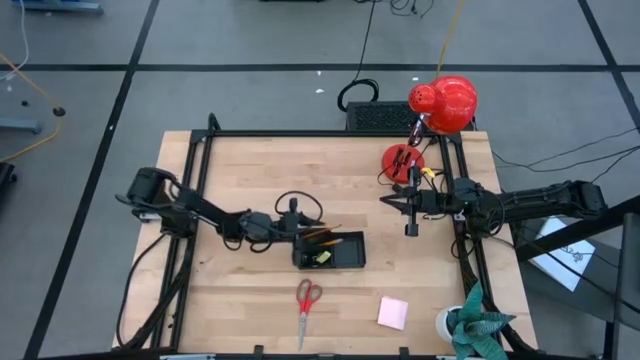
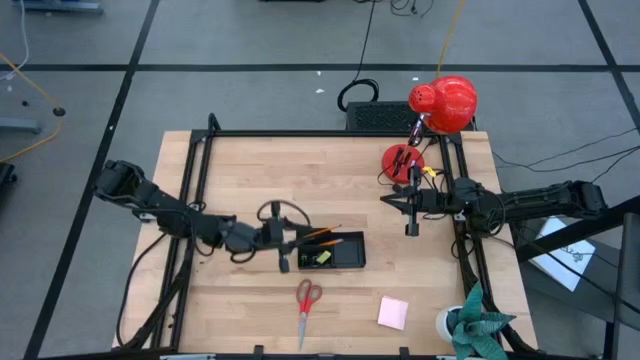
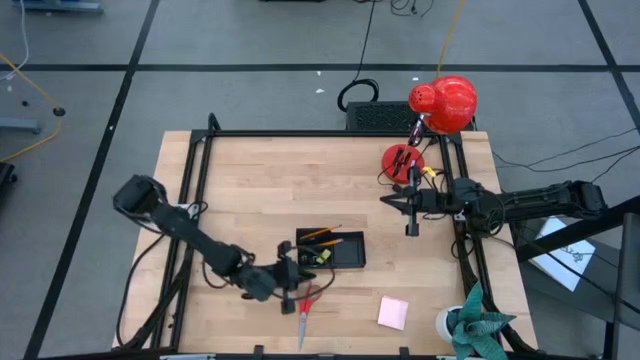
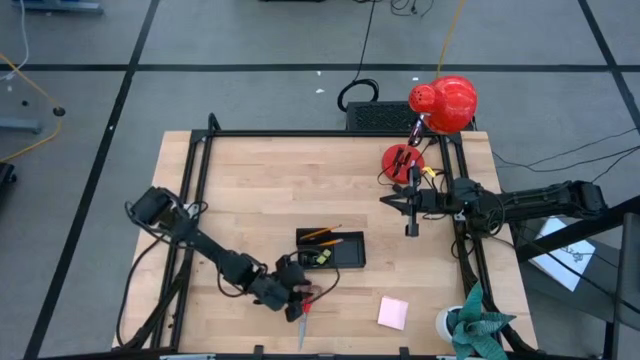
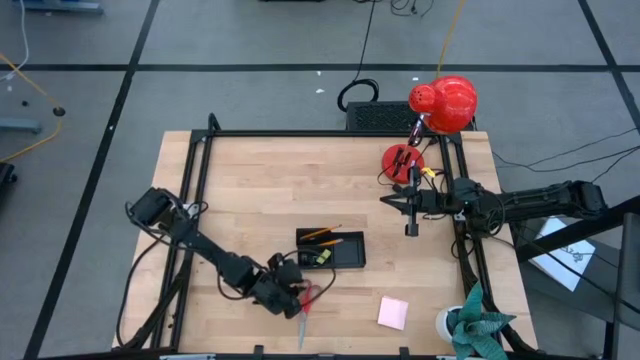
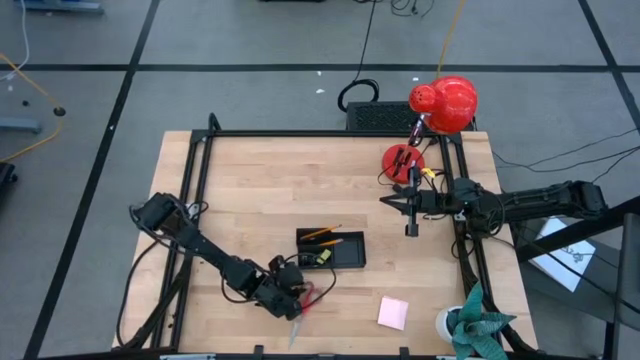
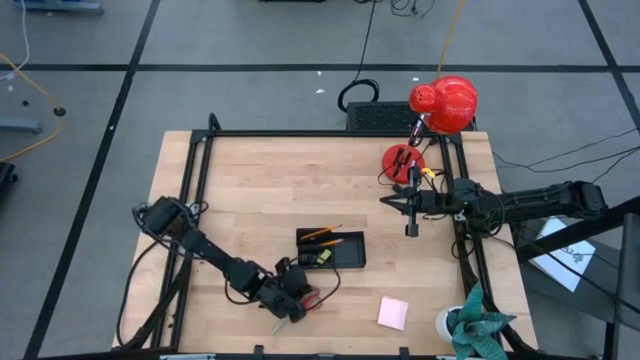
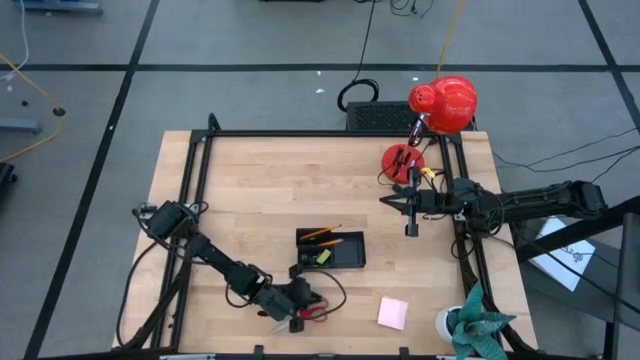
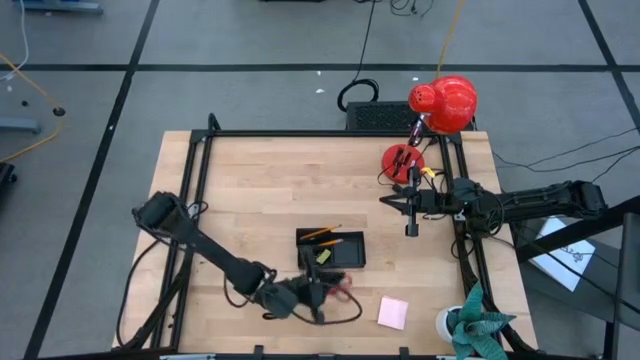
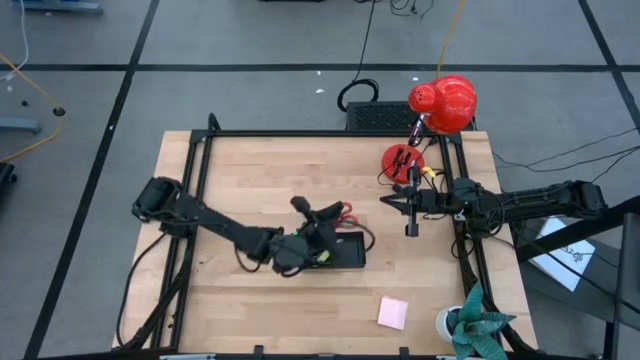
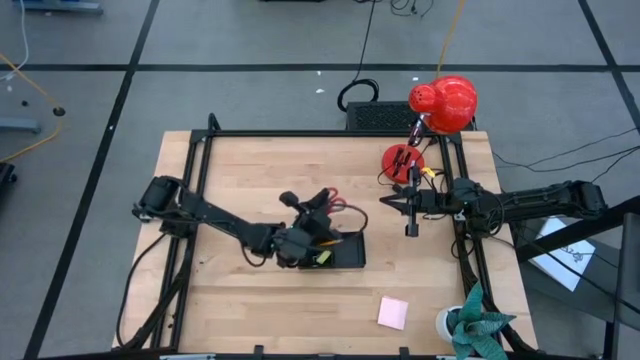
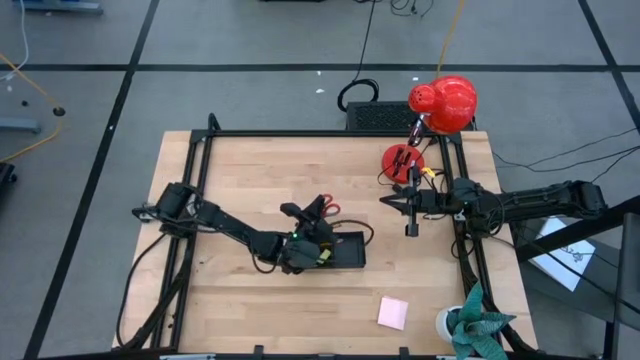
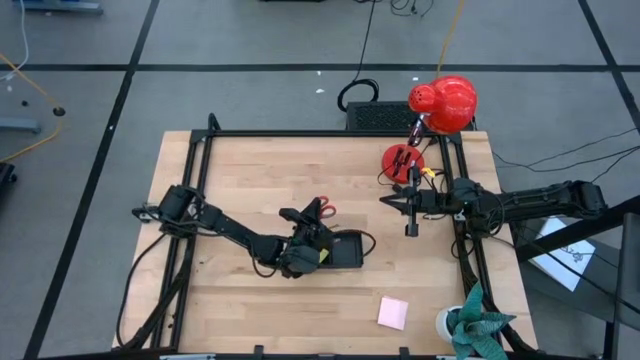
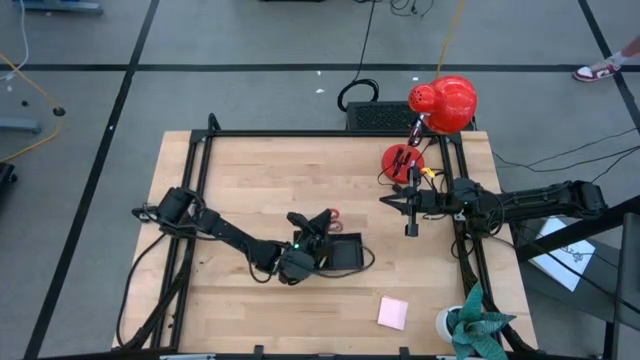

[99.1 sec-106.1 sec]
Task: Pick and place office supplies into organizer
Put the red scissors into the black desk organizer

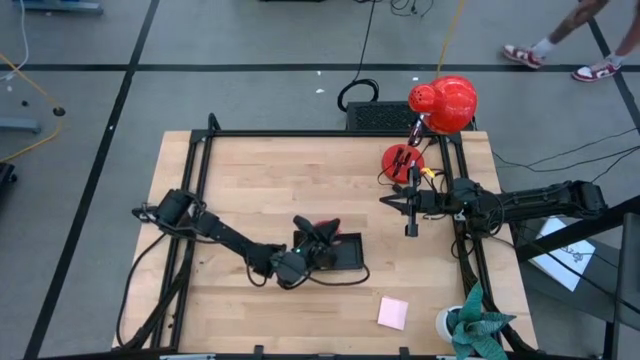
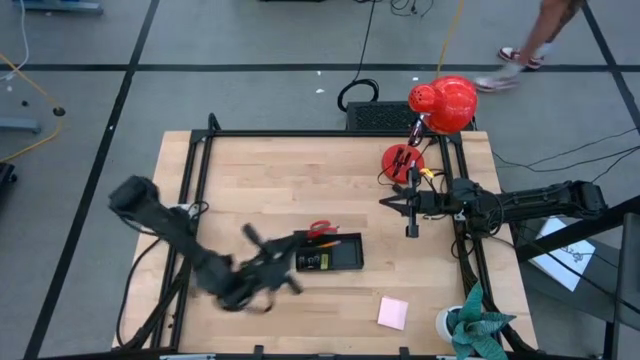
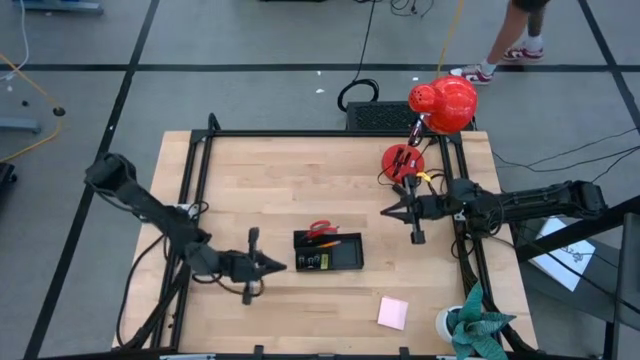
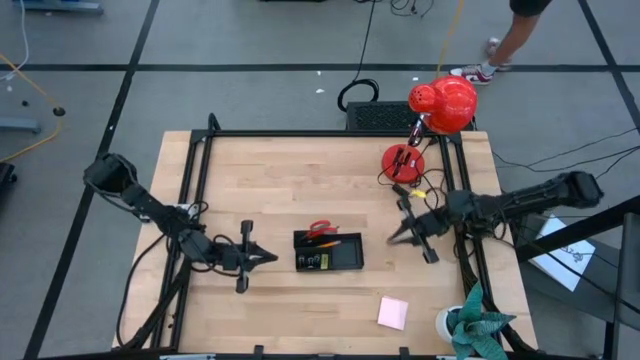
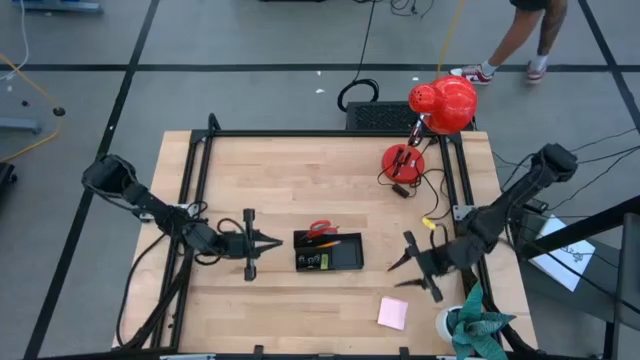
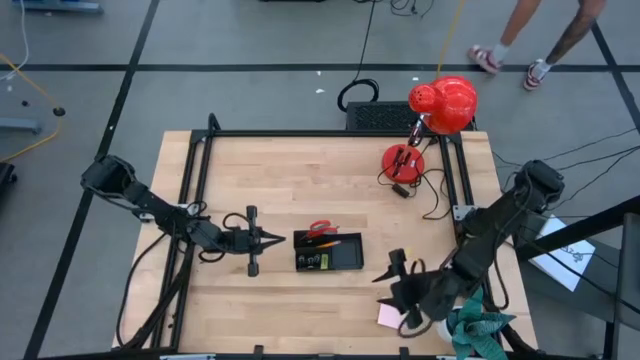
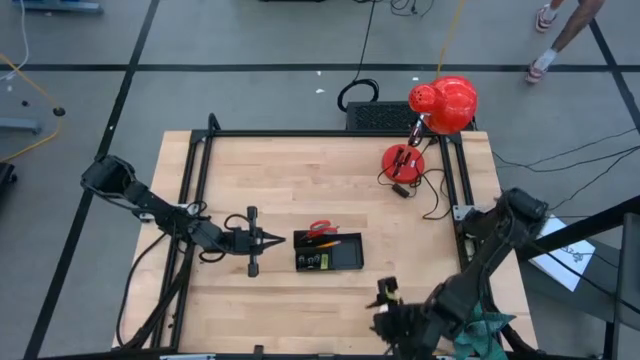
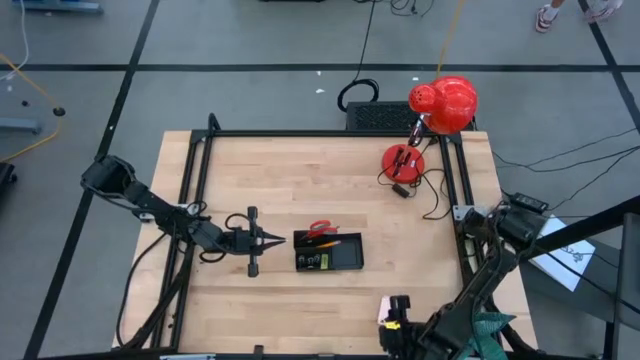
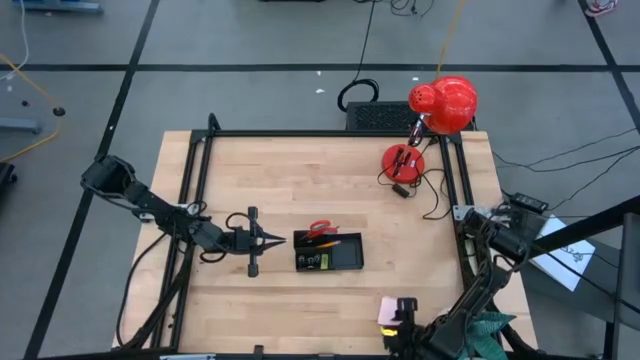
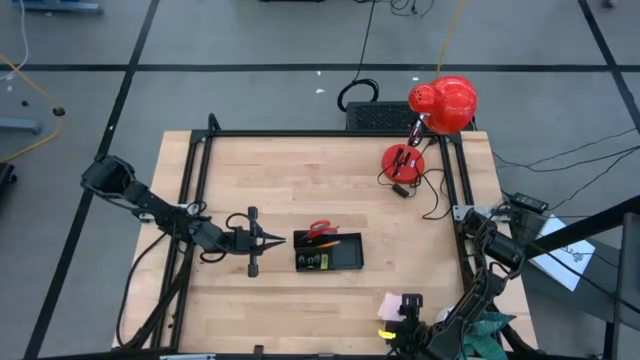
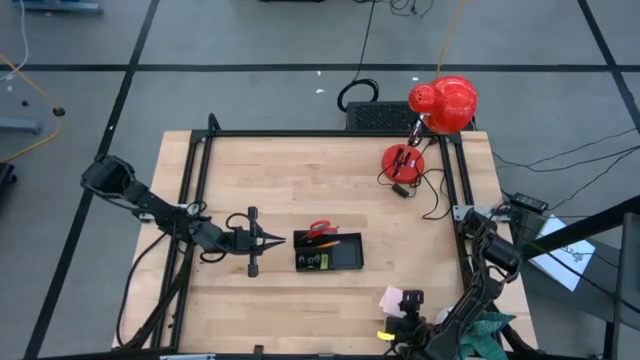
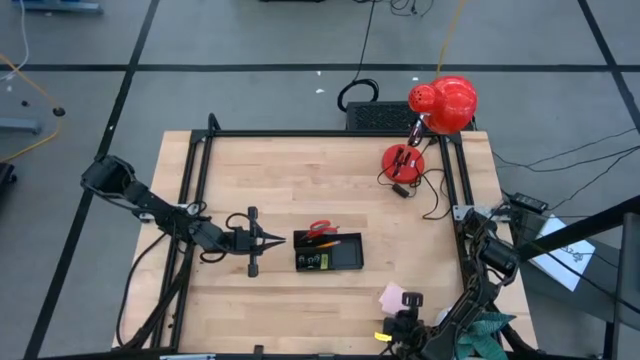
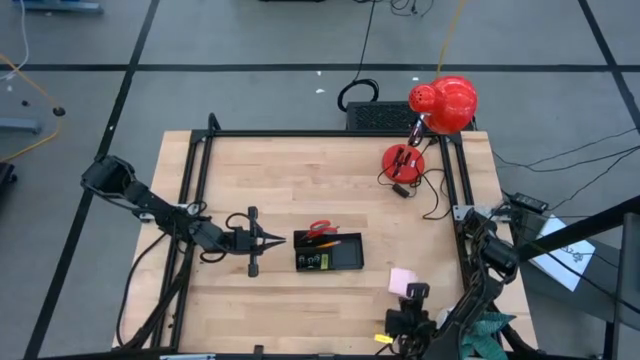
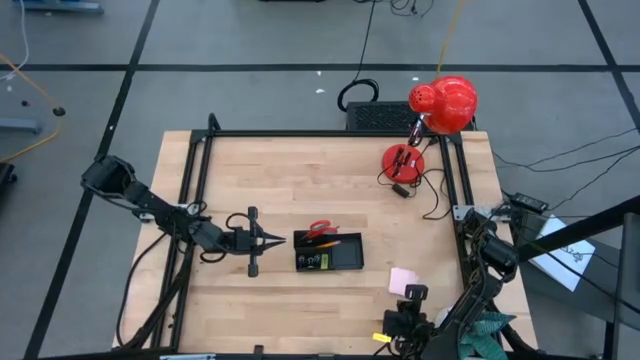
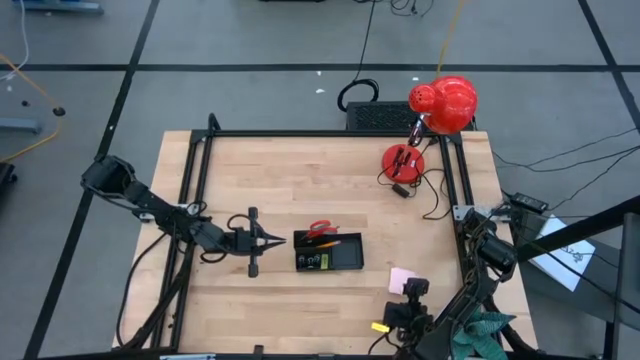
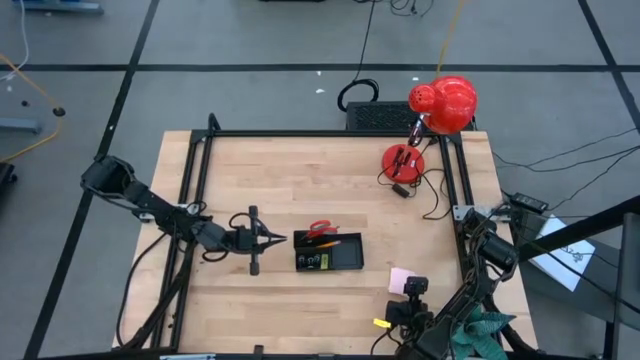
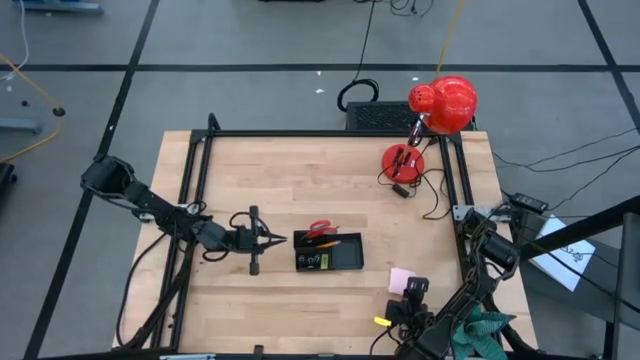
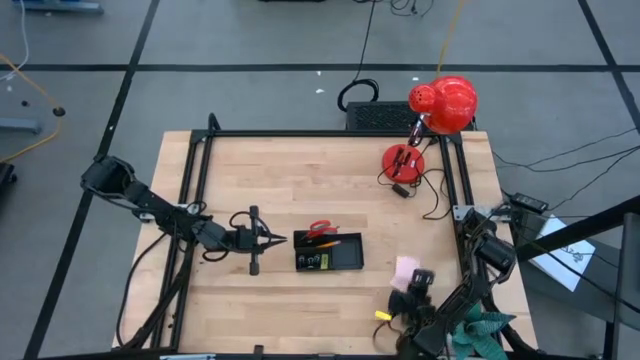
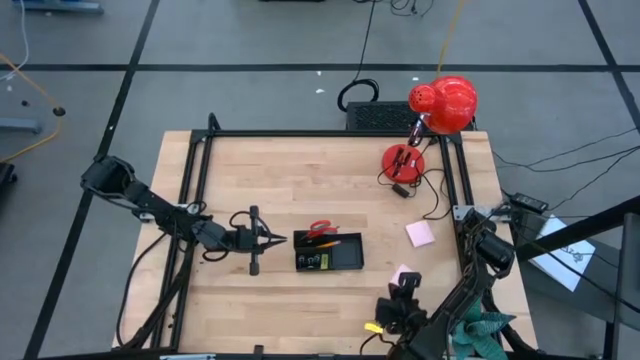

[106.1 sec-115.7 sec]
Put the pink sticky notes into the black desk organizer

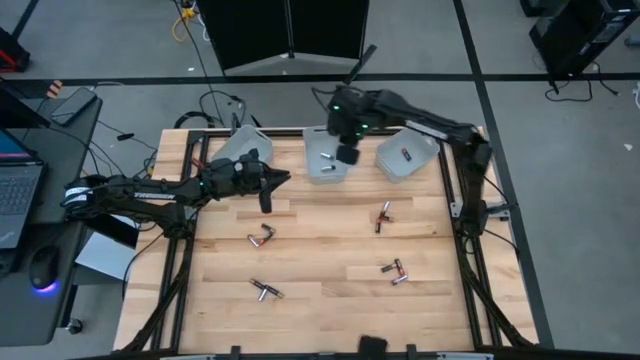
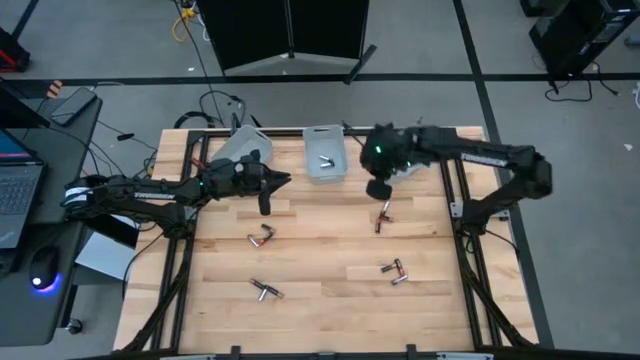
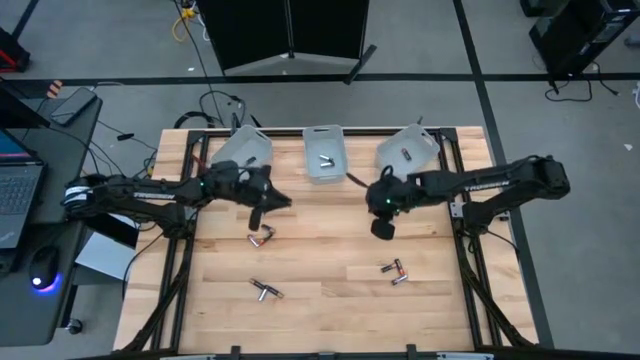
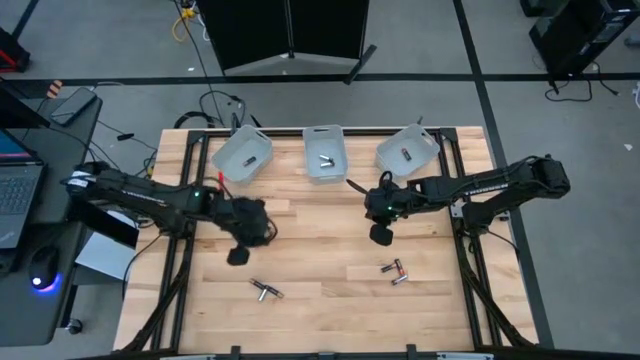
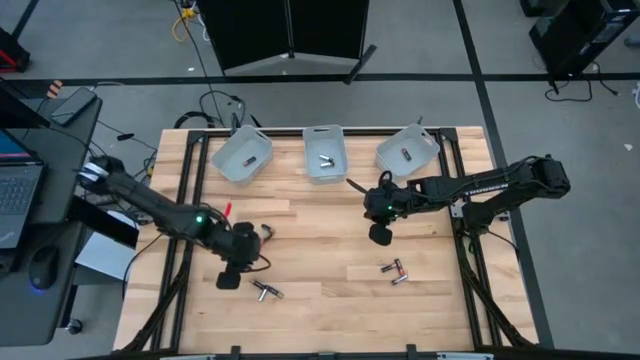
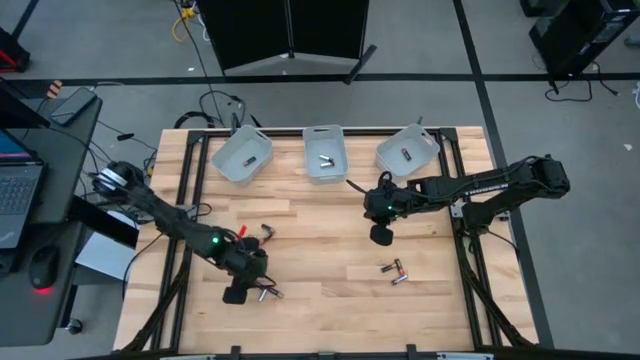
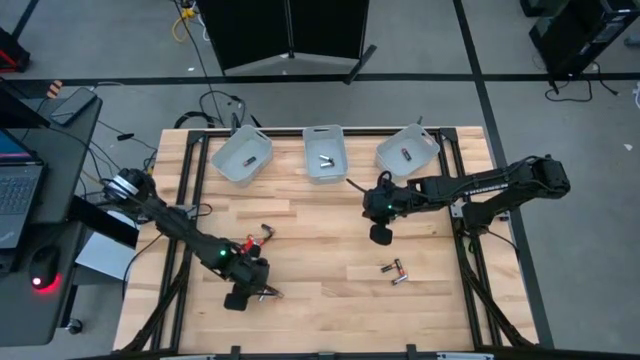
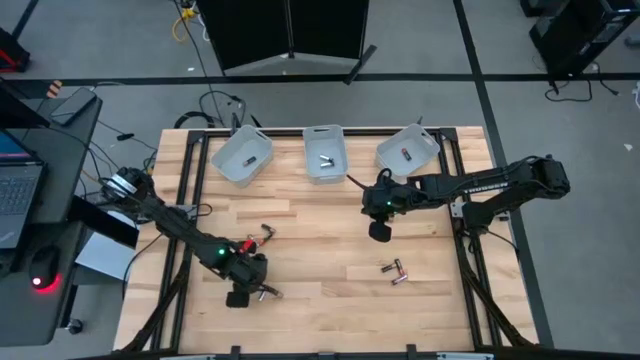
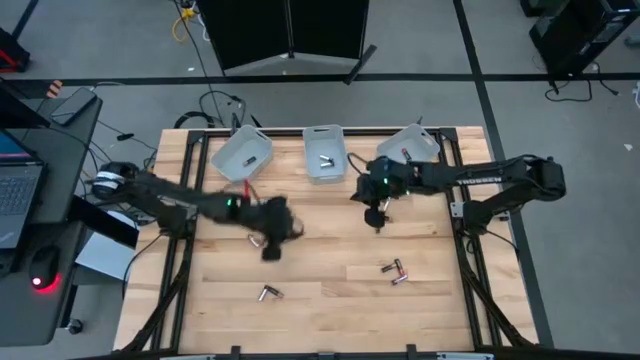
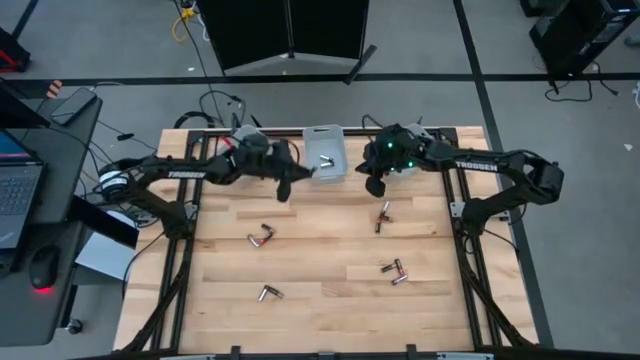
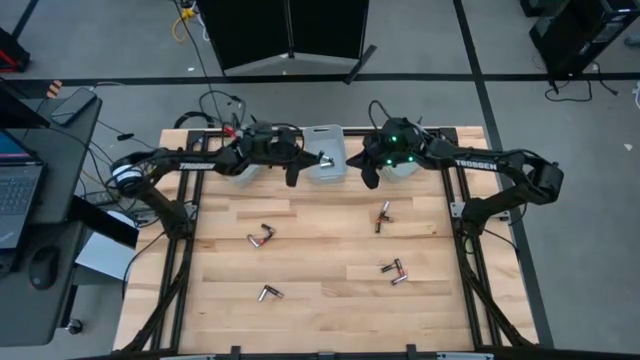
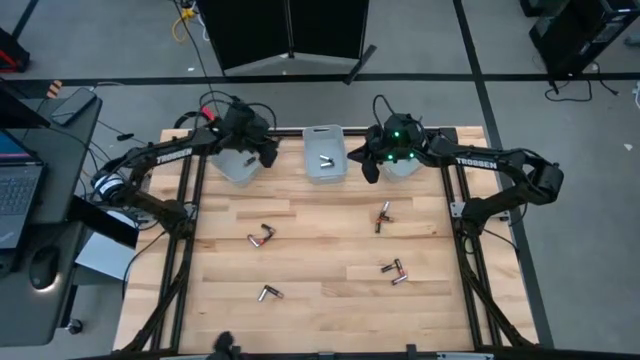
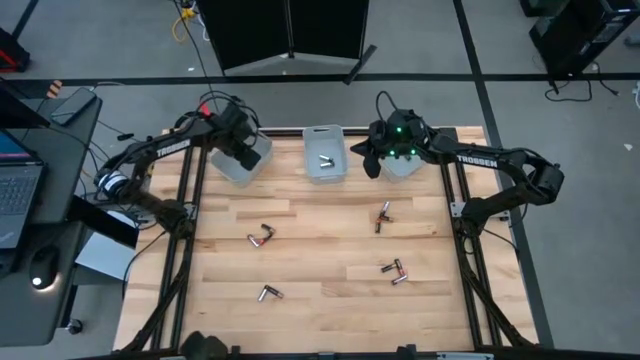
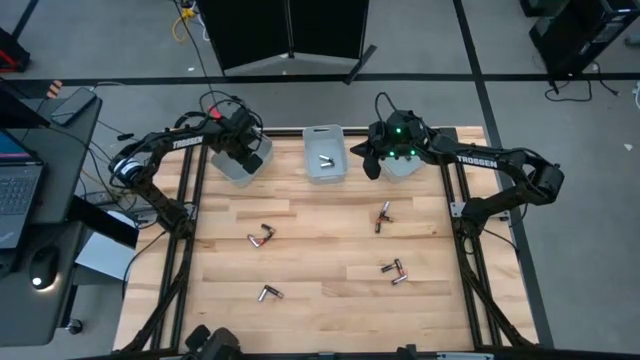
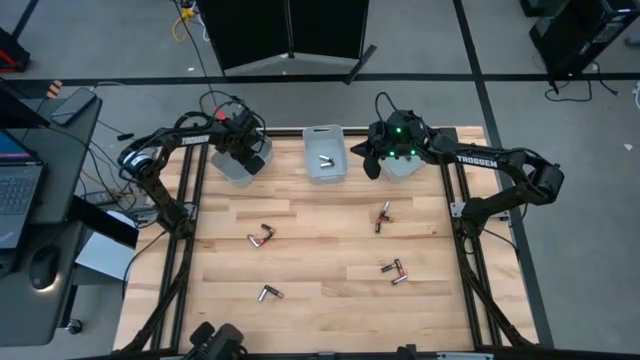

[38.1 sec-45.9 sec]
Task: Sort batteries
Put the gold battery into the left gray bin
